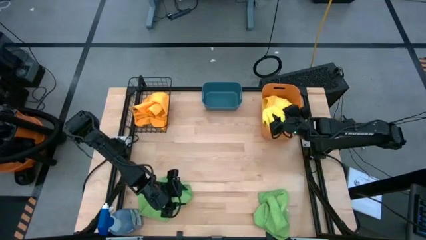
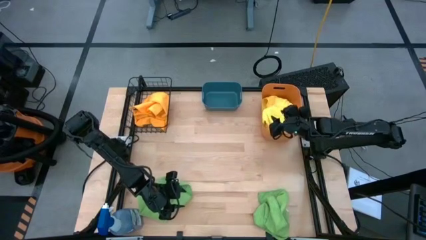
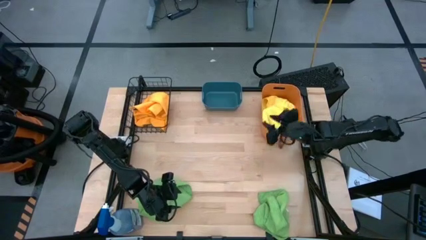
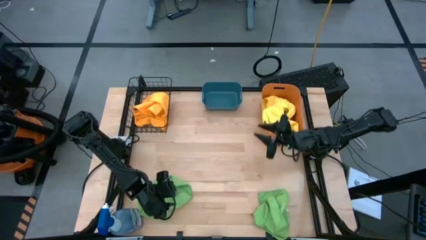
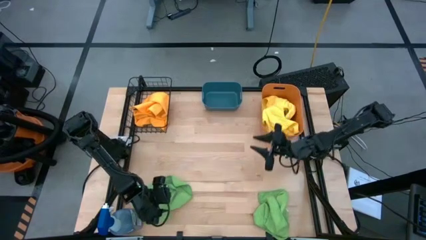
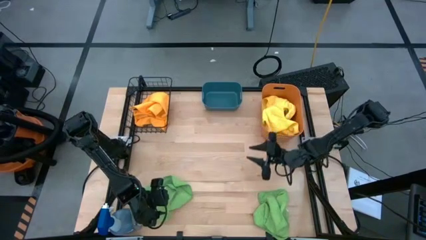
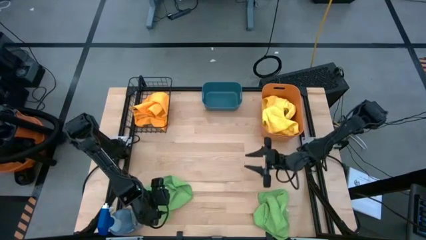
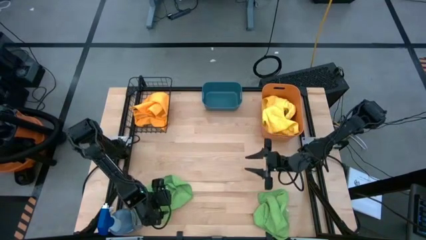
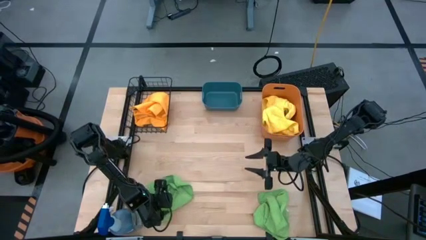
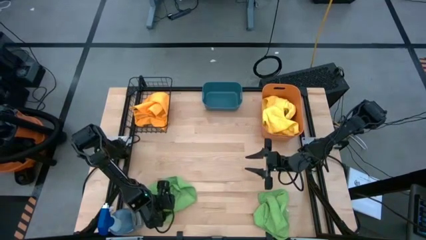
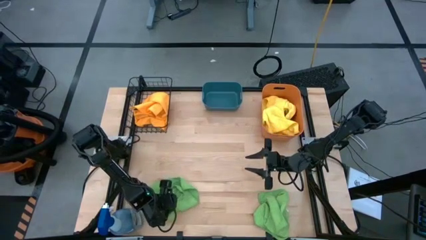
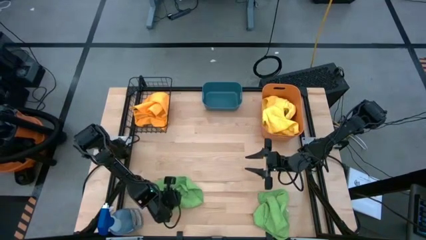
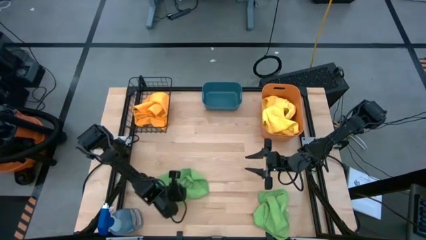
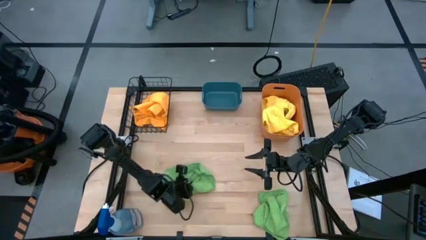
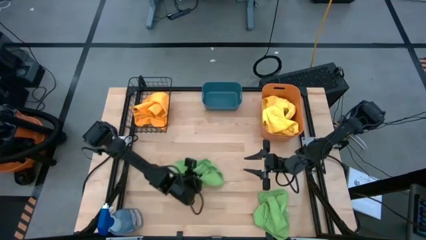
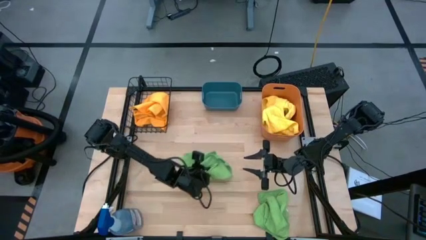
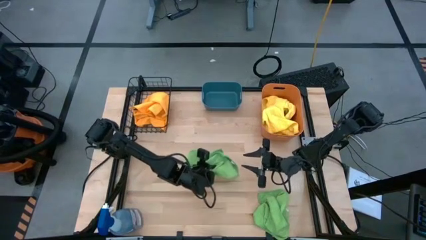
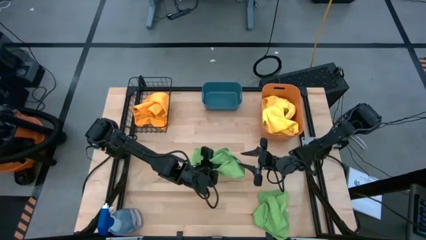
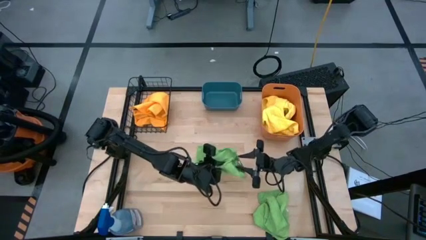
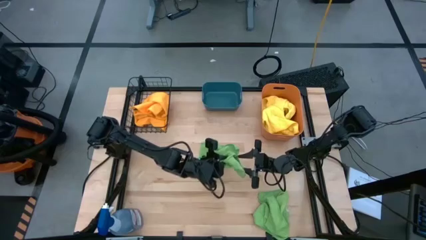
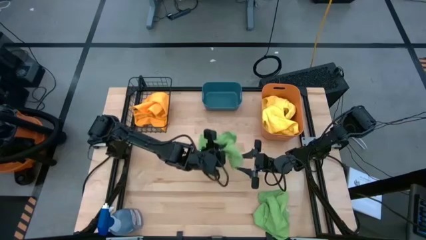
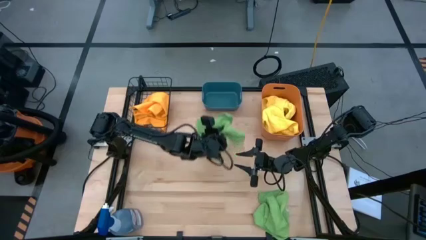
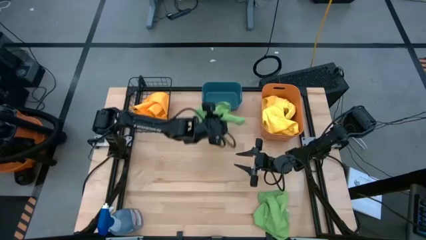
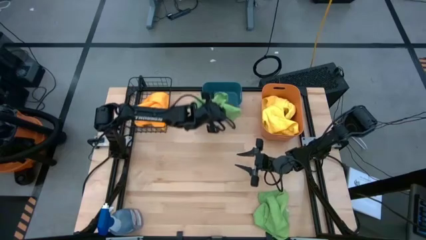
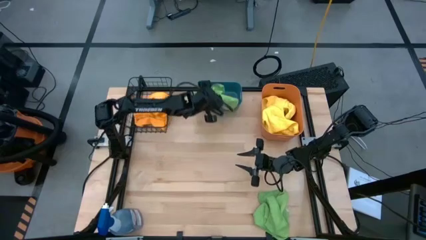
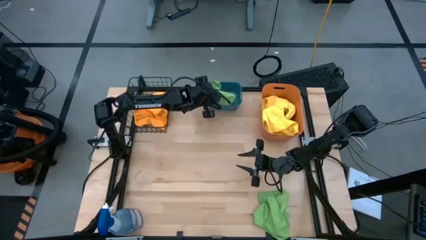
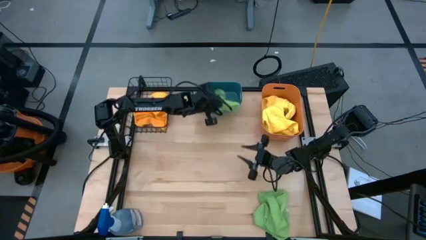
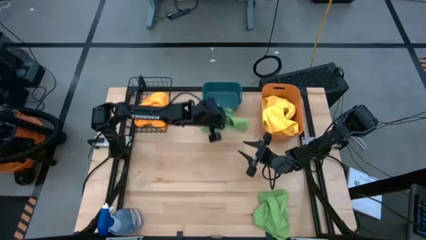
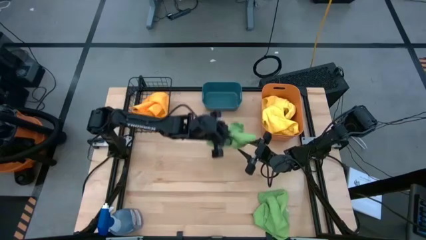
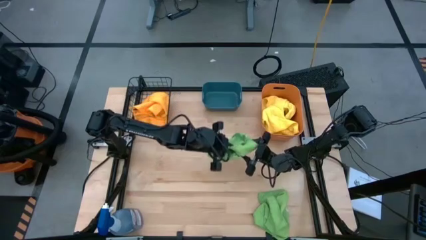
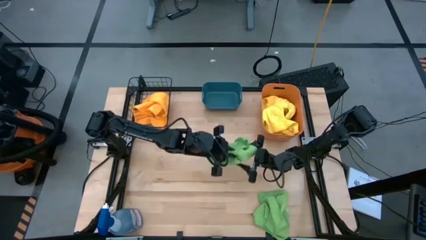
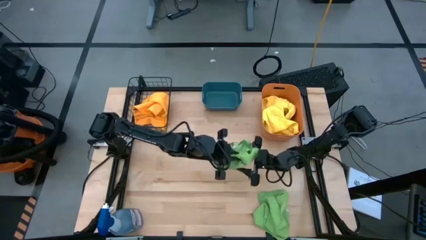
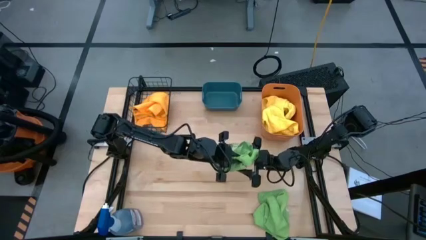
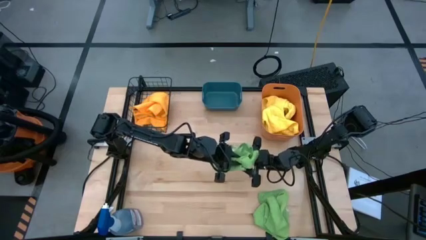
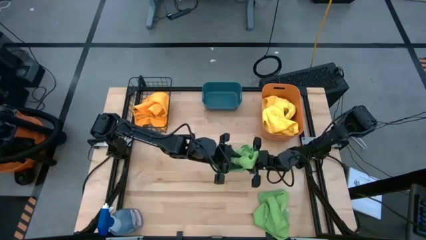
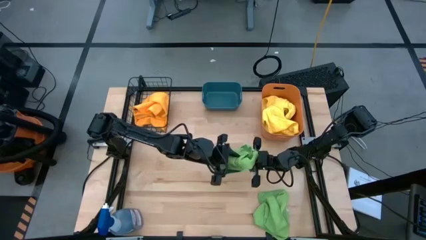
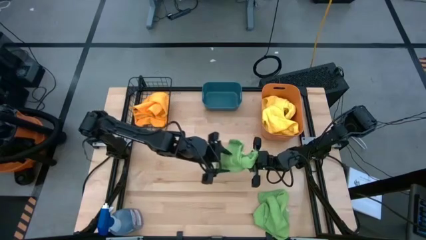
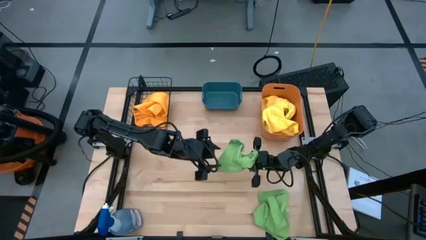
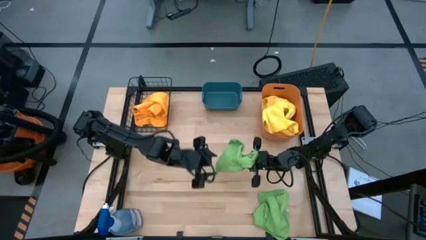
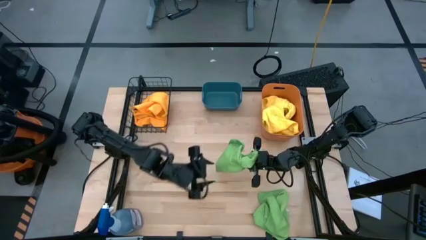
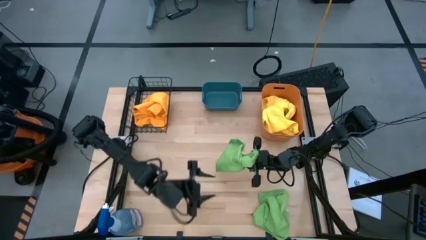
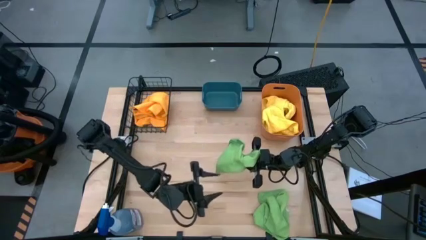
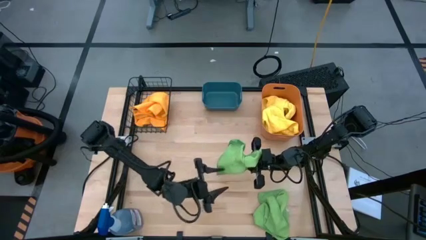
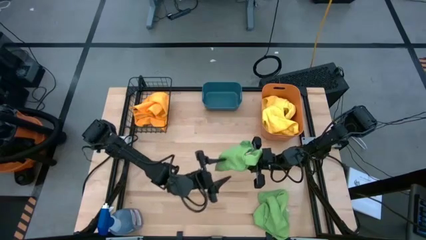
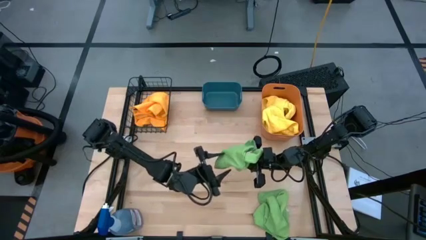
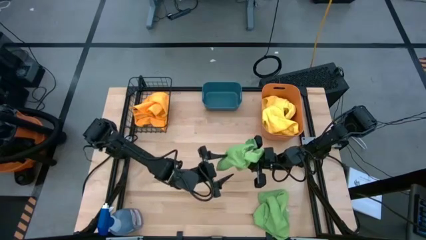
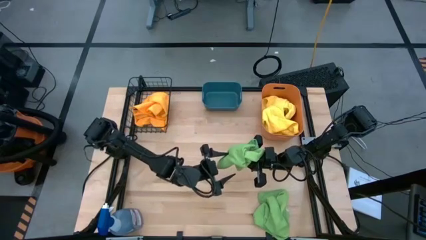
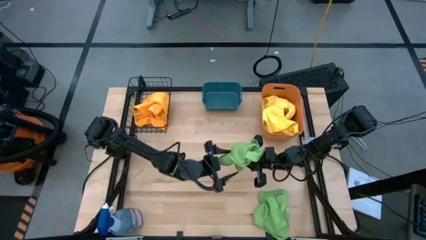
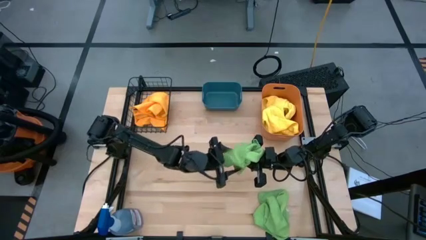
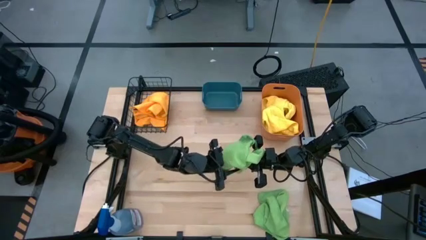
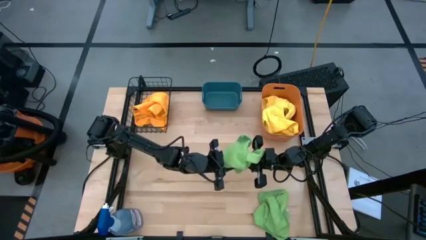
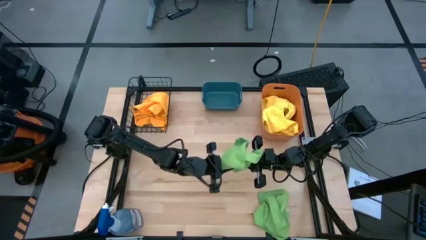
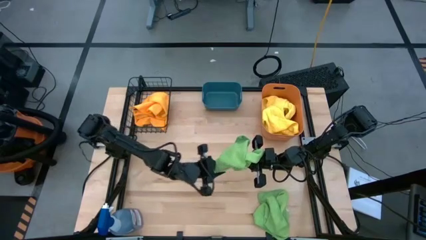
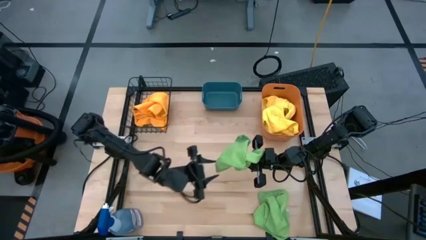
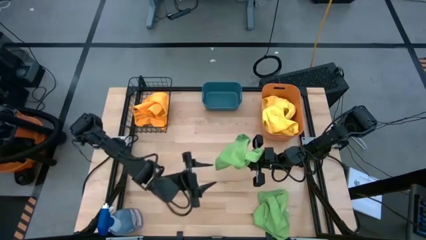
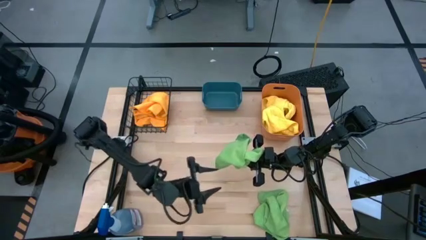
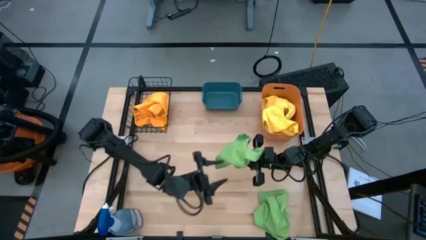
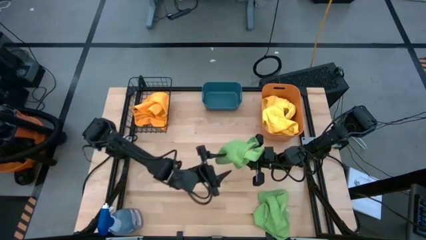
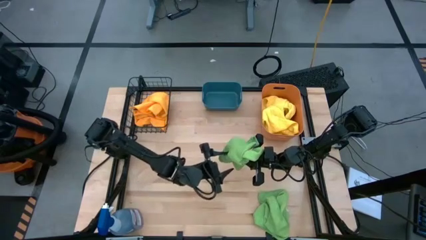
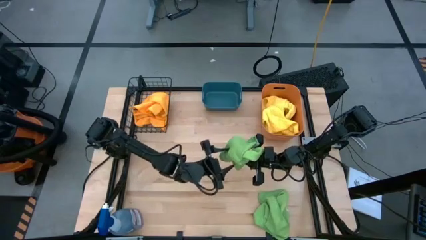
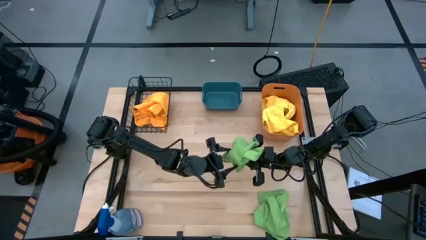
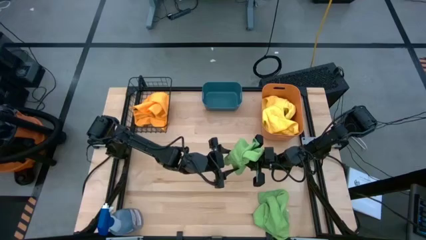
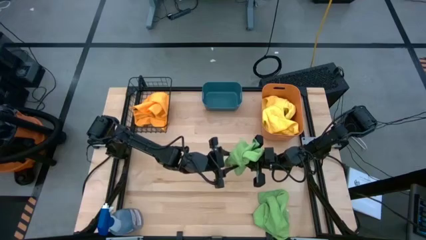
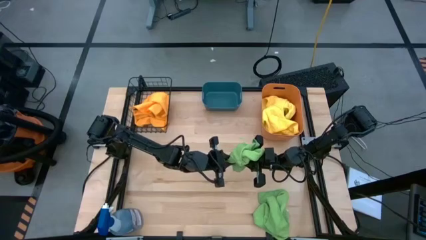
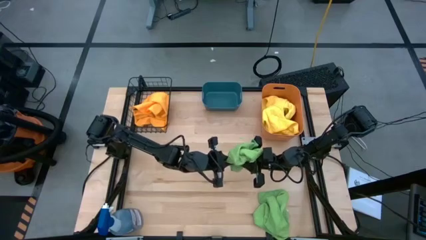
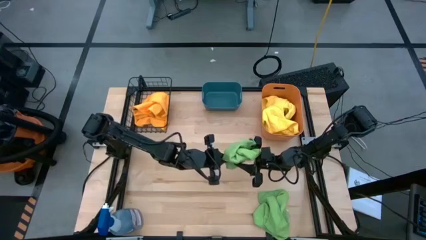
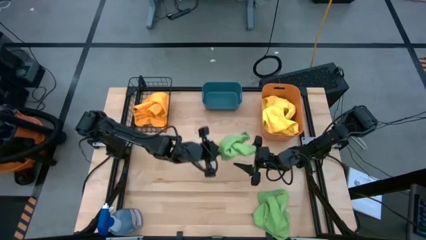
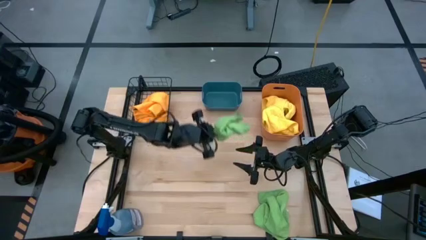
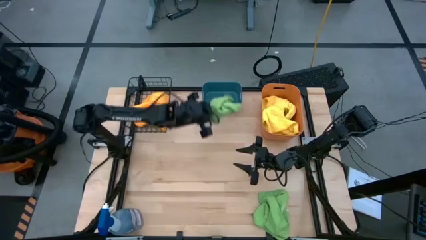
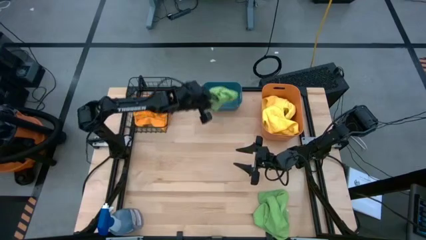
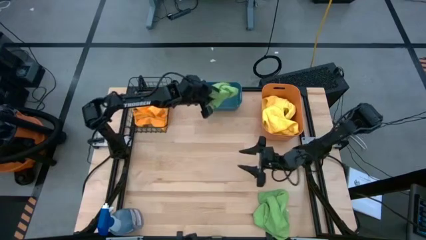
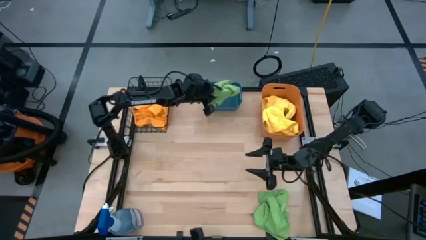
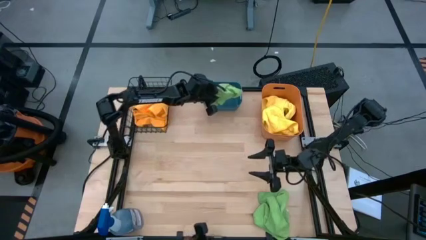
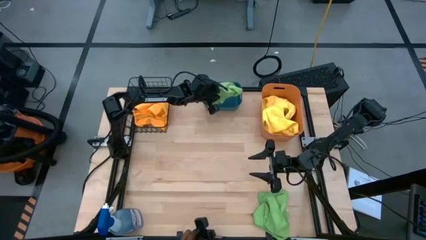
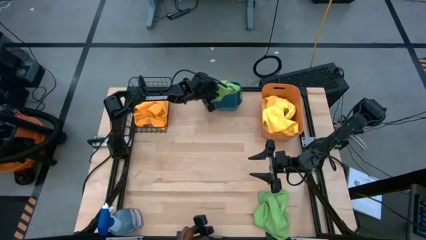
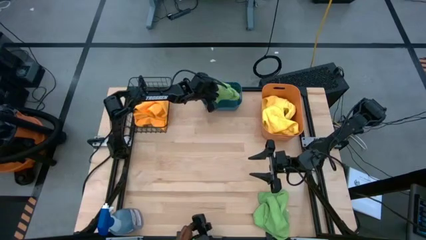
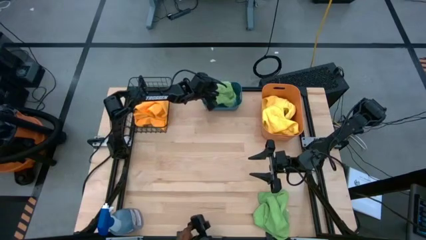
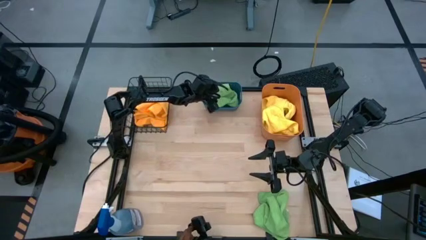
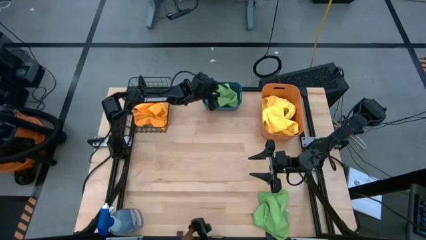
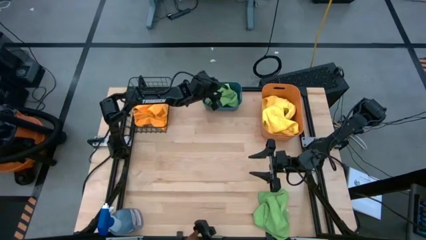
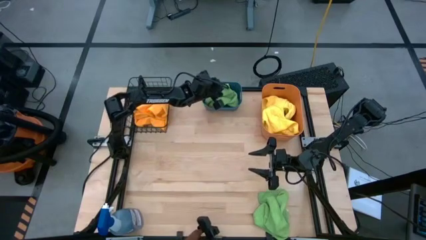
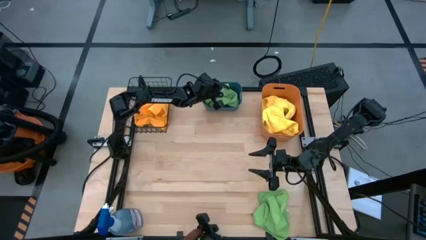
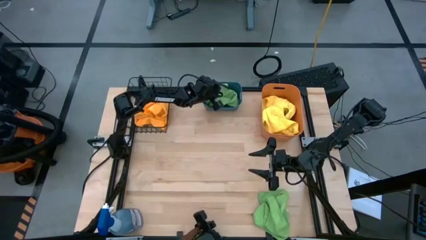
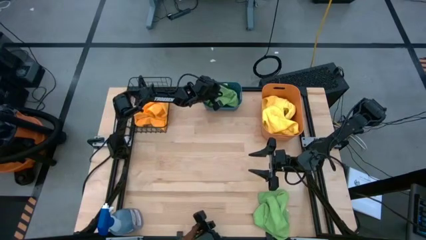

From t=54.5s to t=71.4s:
Task: Sort microfiber towel by color & place in baskets
Put the left green microfiber cloth into the blue bin
